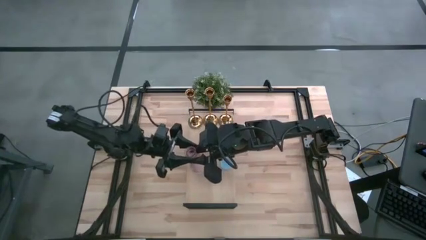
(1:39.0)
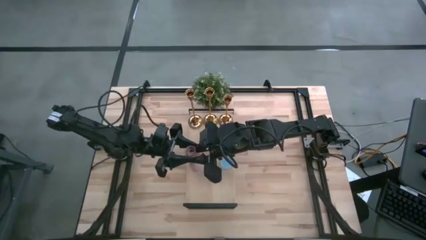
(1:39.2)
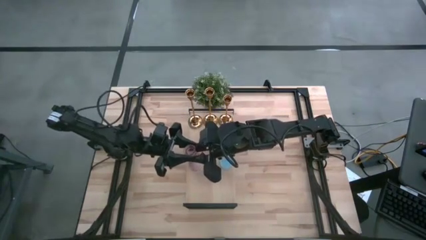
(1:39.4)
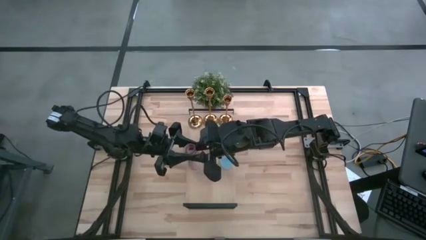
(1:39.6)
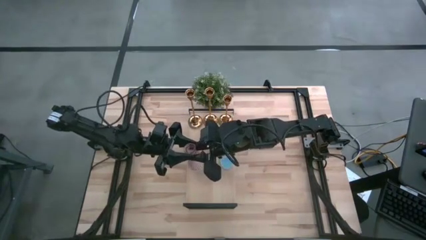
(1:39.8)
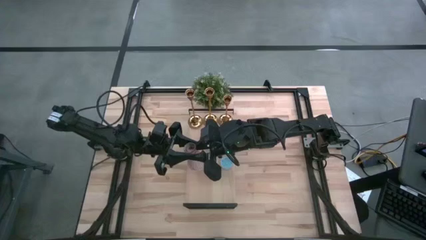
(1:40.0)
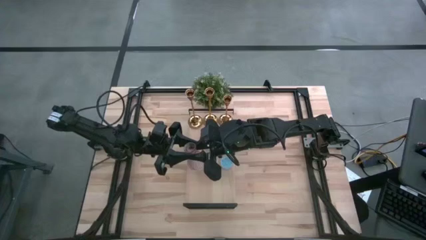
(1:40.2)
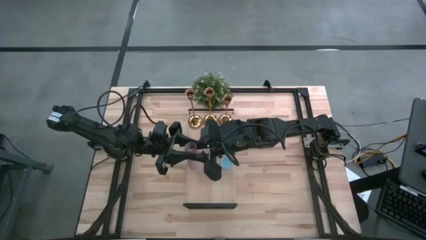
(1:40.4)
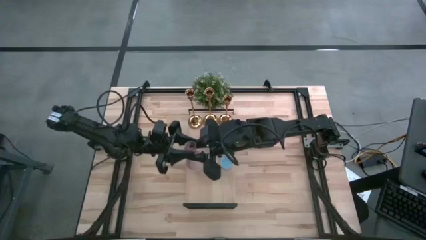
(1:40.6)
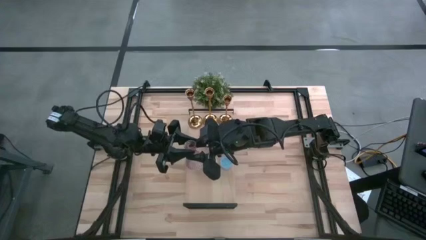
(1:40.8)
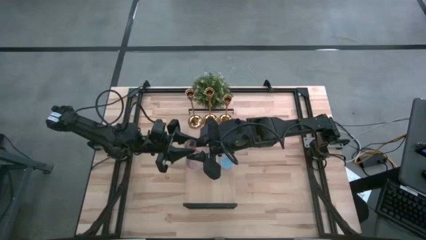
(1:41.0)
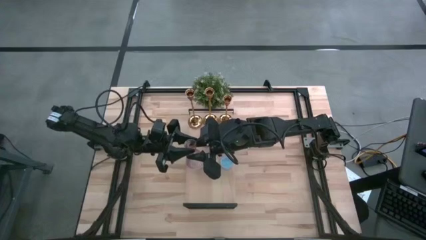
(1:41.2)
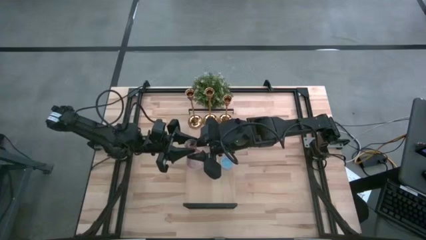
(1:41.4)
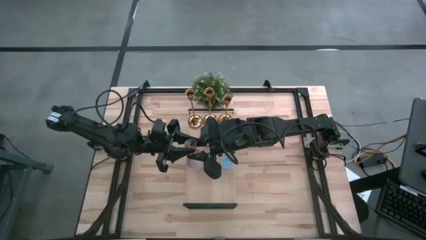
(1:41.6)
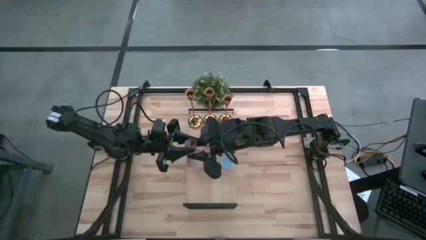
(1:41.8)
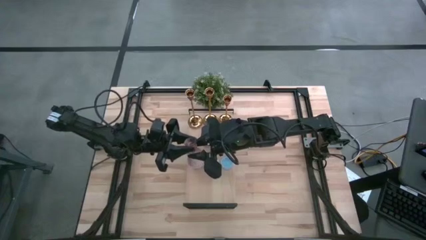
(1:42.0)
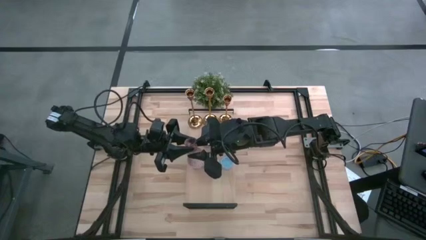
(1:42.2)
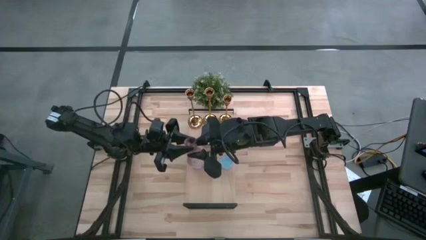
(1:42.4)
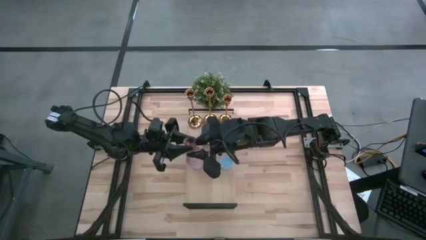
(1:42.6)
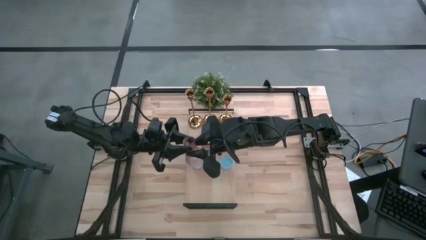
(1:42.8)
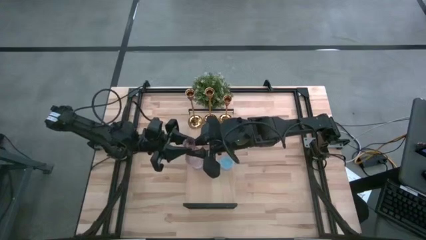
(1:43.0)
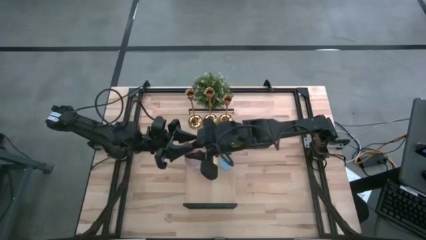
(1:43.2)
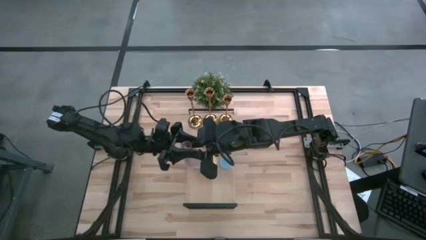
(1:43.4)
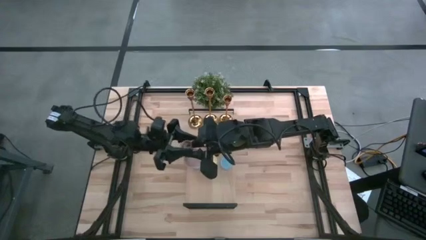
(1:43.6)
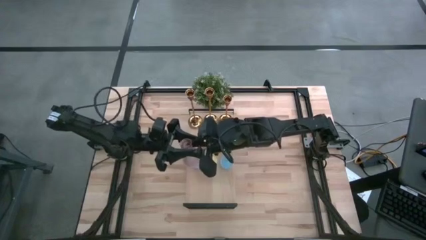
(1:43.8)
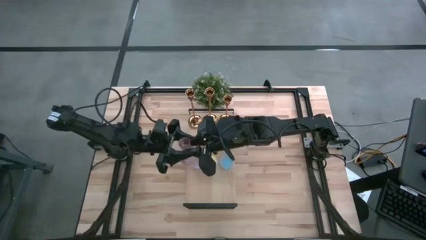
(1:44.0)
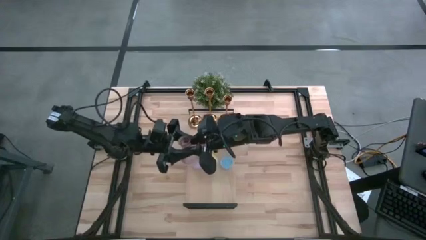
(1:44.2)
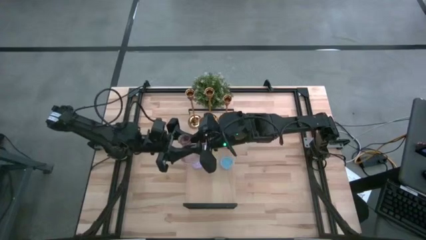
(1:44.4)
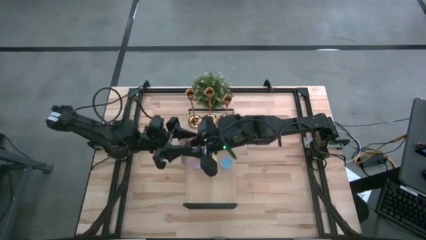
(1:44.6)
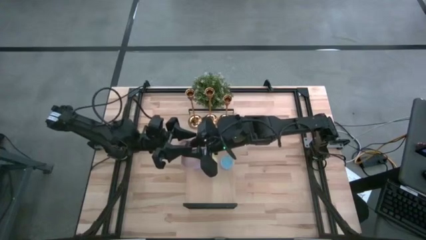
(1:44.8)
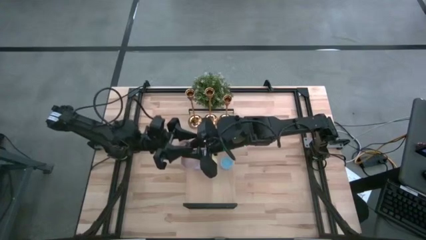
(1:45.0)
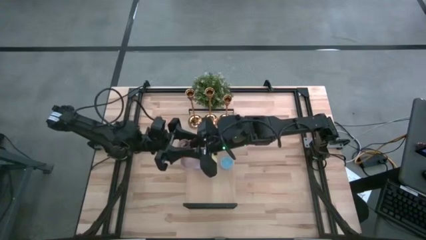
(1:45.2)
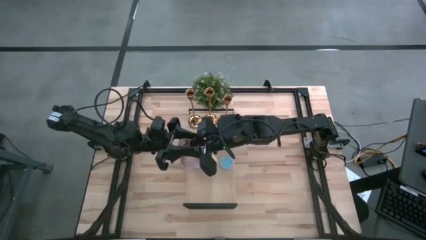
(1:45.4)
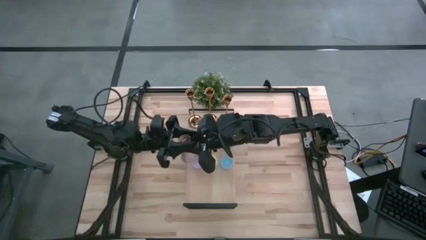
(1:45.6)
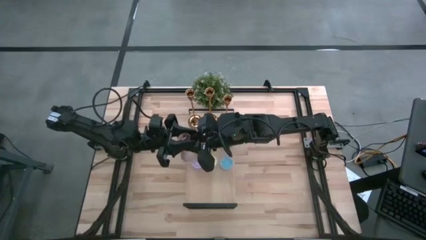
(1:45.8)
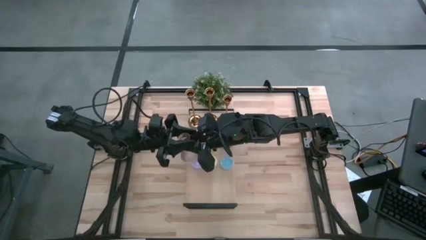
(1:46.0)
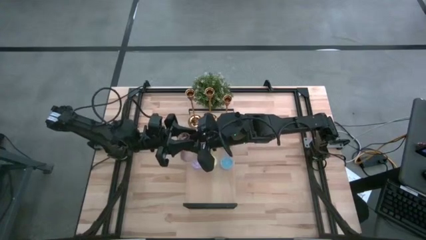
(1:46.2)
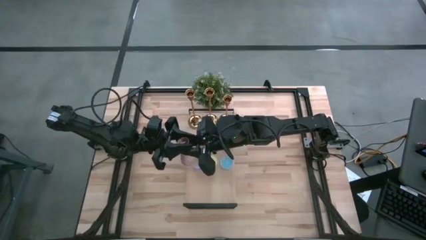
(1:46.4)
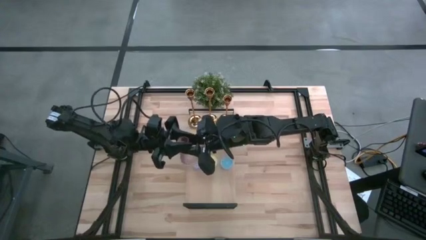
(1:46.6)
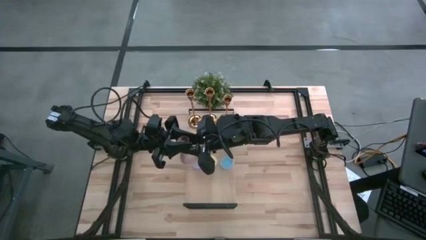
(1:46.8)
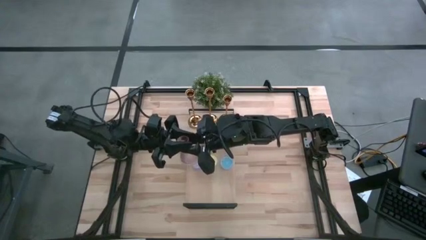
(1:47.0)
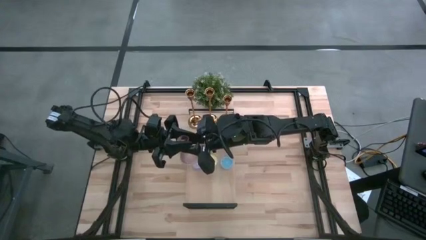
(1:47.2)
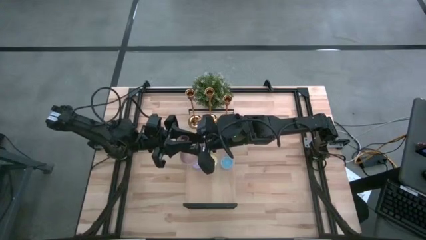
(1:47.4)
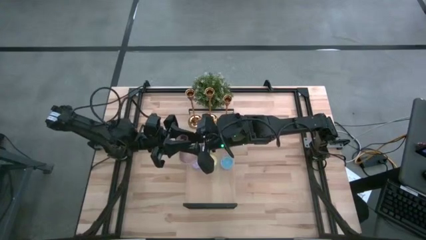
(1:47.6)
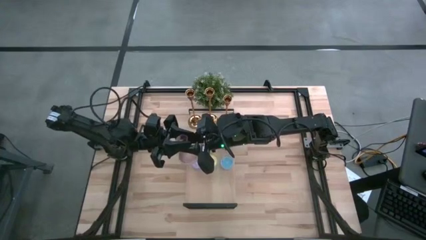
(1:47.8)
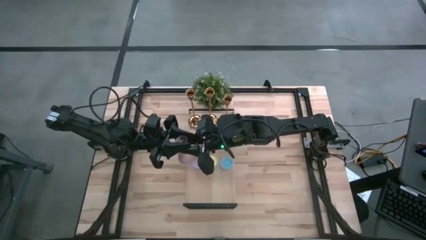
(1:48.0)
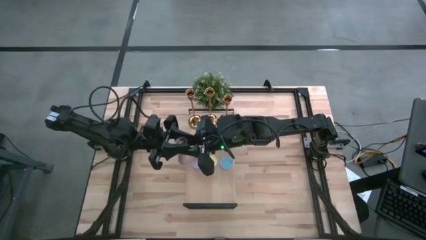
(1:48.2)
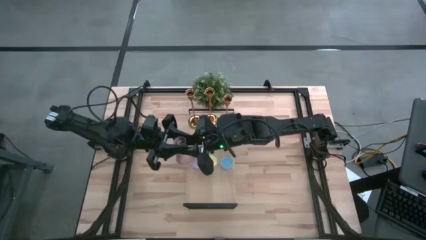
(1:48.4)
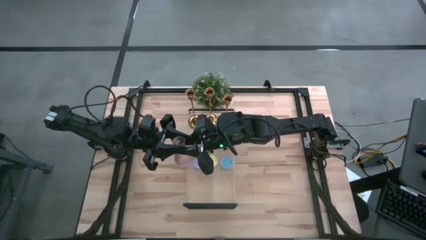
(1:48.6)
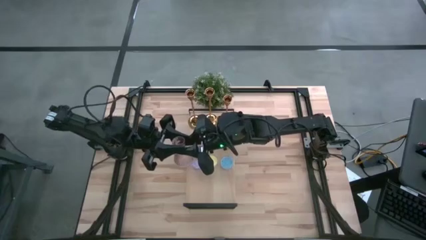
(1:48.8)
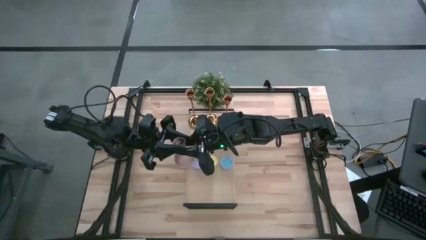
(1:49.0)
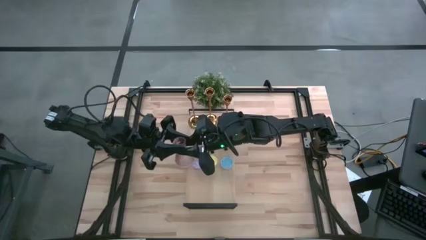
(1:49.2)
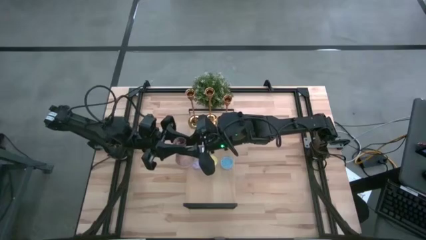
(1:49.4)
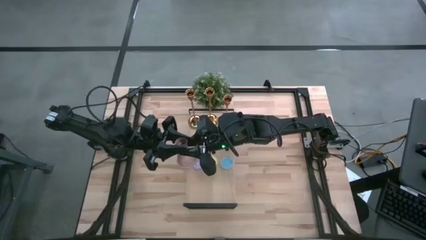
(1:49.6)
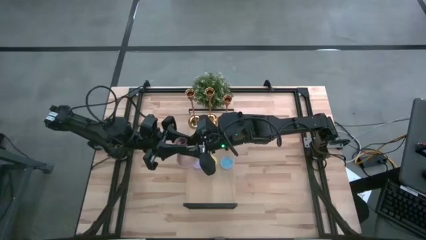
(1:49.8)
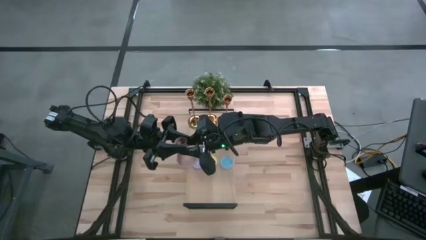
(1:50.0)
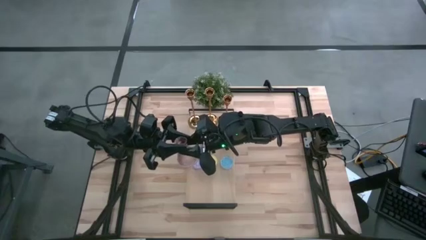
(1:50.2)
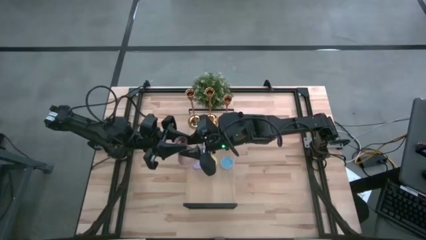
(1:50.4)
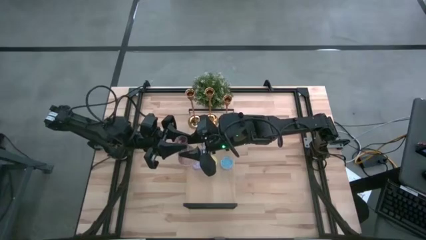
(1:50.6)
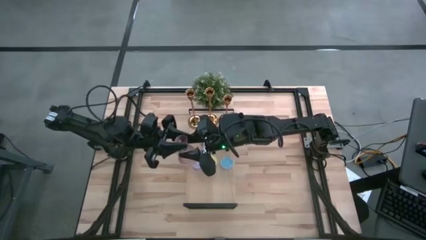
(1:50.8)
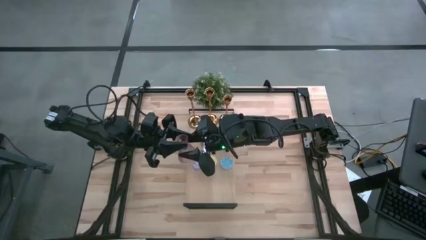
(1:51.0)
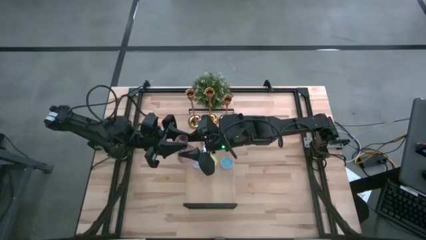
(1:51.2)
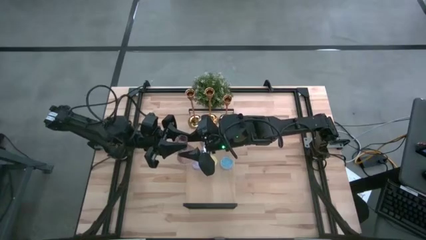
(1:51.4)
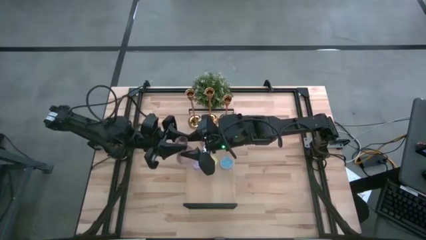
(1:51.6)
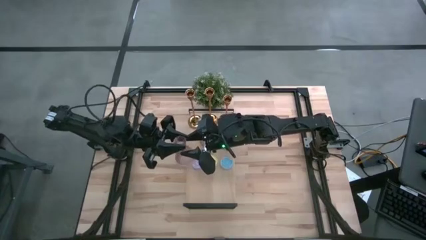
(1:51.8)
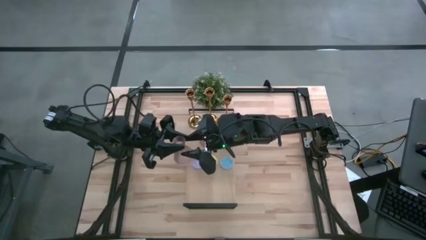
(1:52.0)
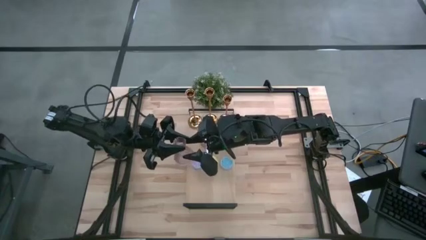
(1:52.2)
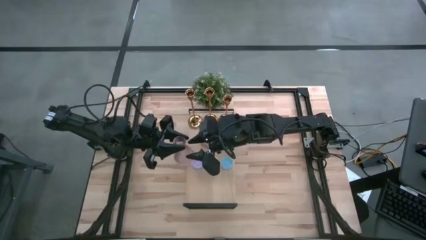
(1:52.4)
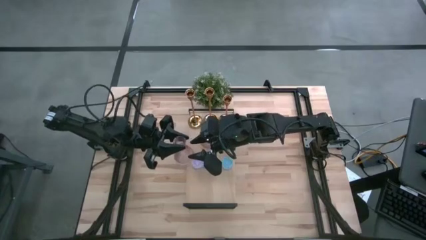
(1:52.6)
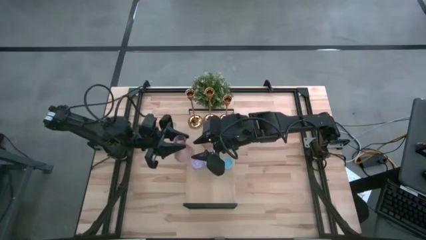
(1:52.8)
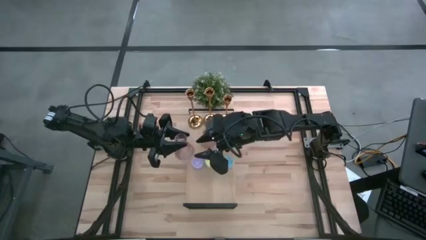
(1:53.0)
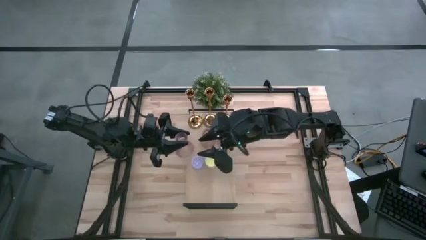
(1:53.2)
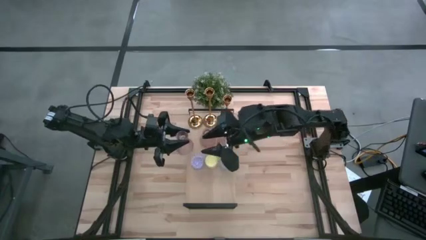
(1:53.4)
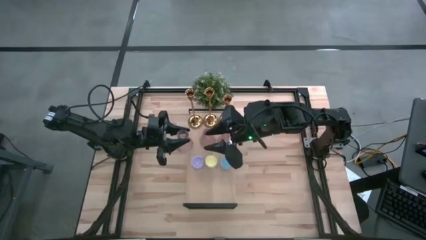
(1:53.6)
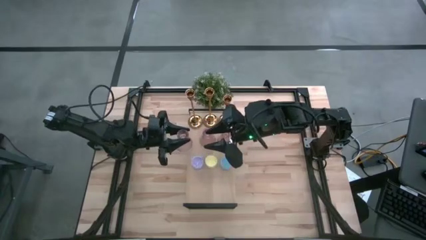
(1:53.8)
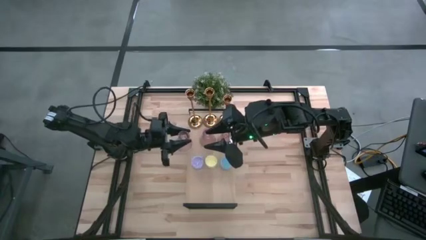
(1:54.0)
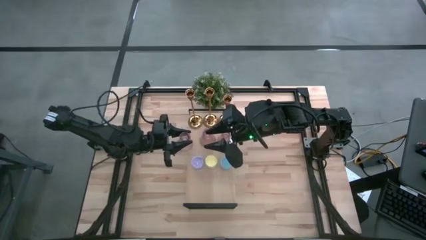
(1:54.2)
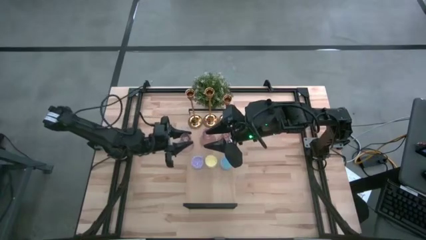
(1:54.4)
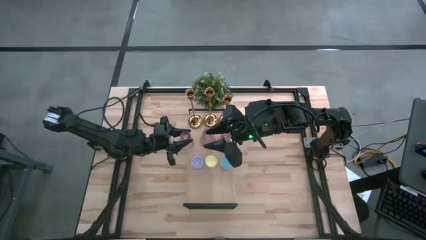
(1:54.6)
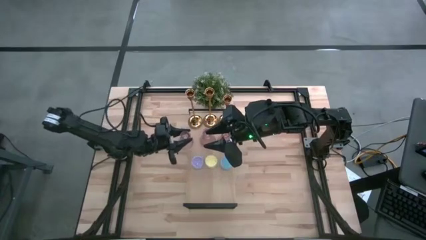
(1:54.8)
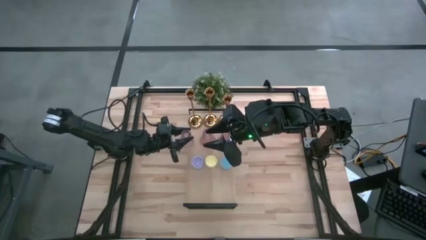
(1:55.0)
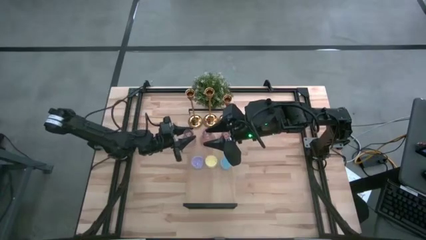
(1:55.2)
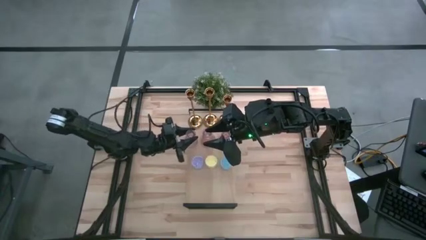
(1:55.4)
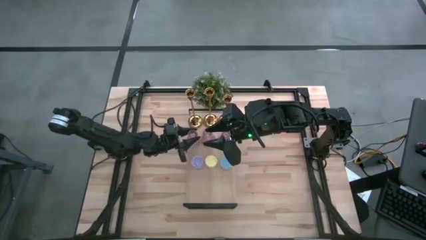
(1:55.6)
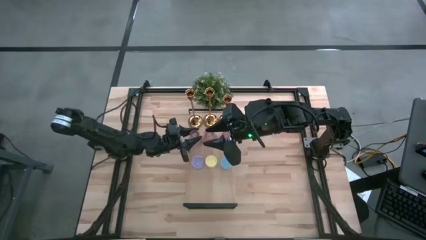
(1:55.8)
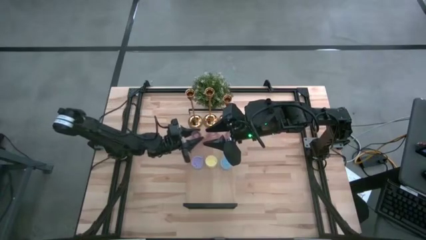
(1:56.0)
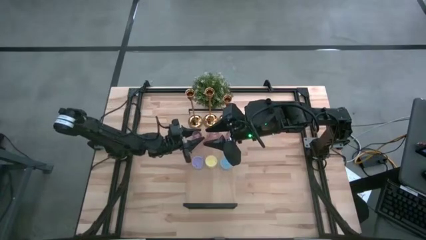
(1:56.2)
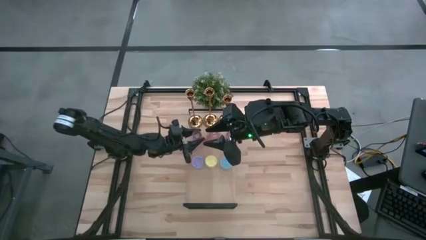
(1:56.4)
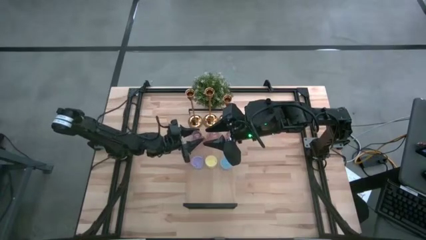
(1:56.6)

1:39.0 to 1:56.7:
Task: Pick & Place candle stick holders
Put the pink glass candle holder on the shelf aligned with the pink glass candle holders
